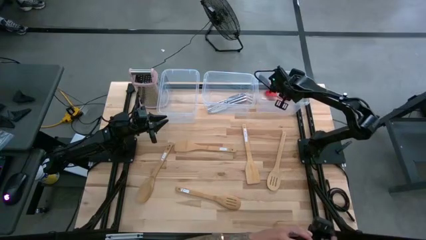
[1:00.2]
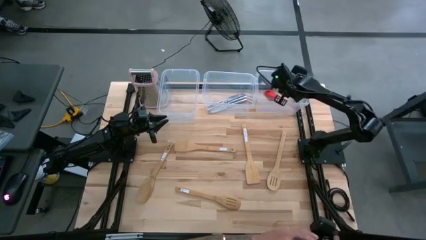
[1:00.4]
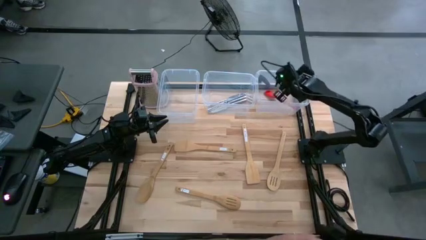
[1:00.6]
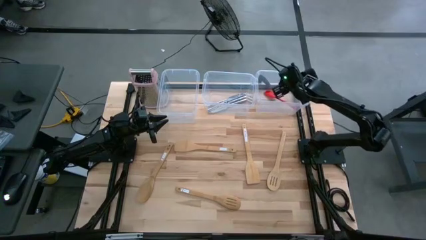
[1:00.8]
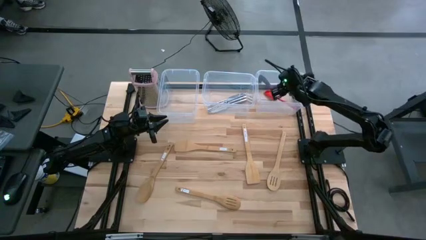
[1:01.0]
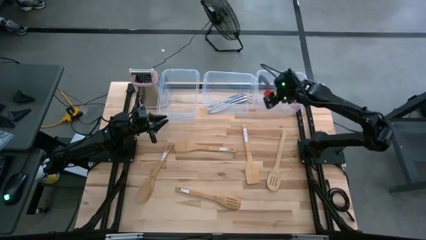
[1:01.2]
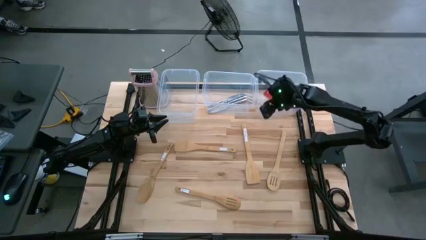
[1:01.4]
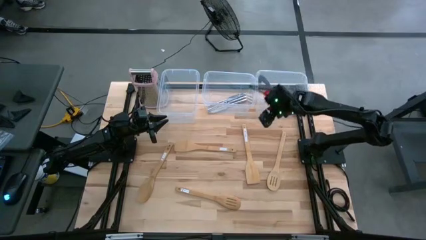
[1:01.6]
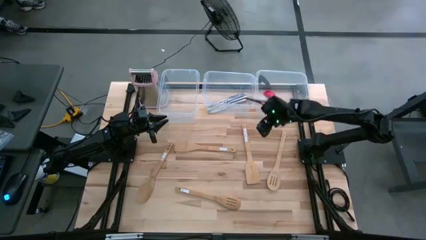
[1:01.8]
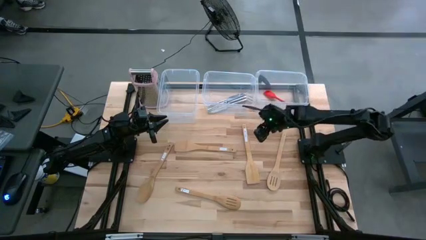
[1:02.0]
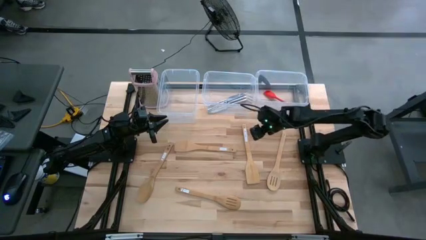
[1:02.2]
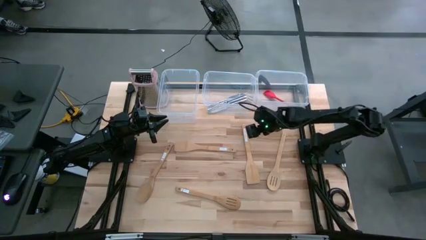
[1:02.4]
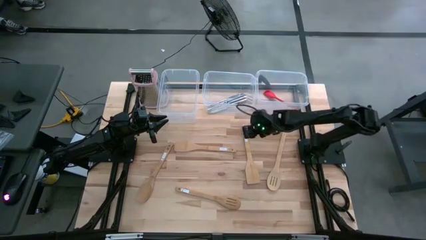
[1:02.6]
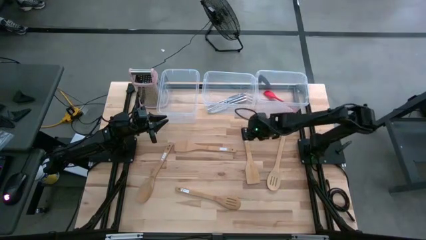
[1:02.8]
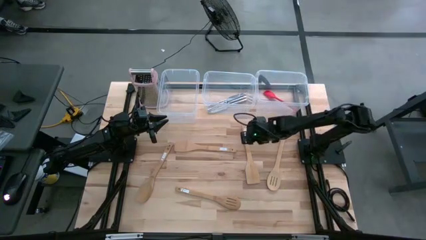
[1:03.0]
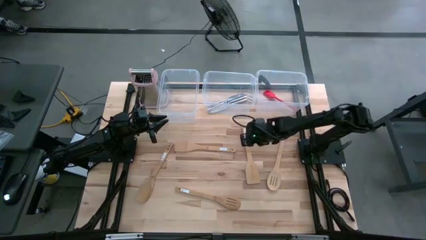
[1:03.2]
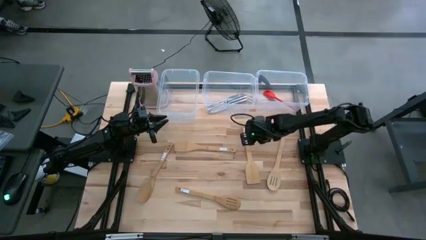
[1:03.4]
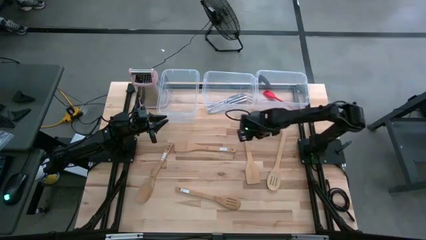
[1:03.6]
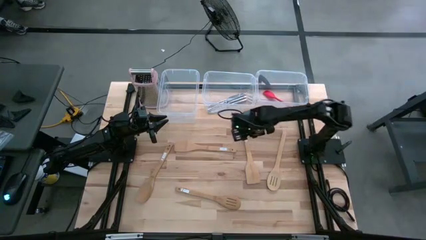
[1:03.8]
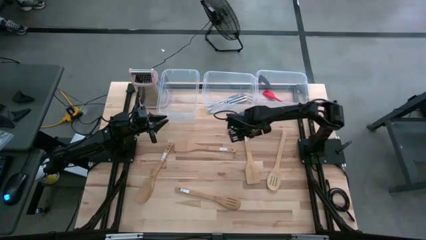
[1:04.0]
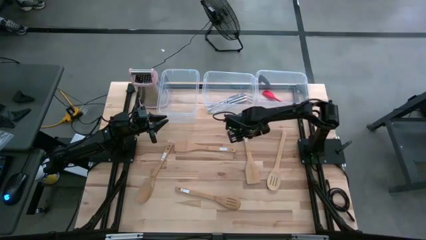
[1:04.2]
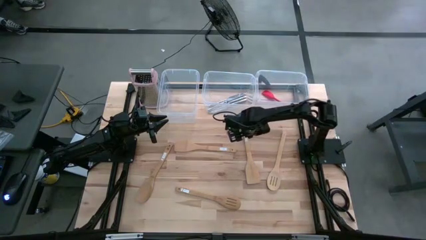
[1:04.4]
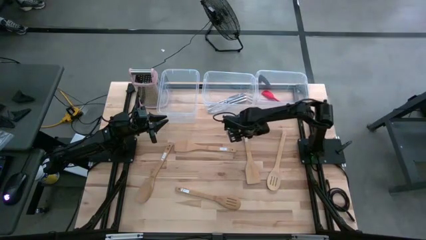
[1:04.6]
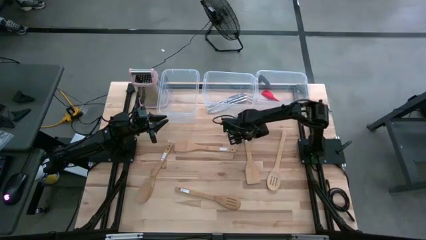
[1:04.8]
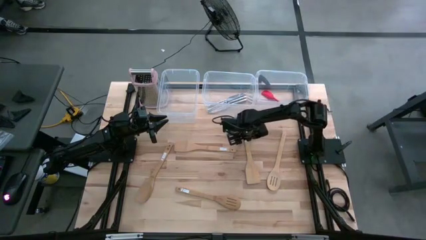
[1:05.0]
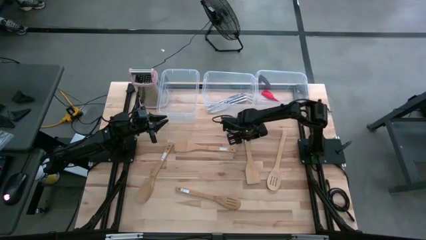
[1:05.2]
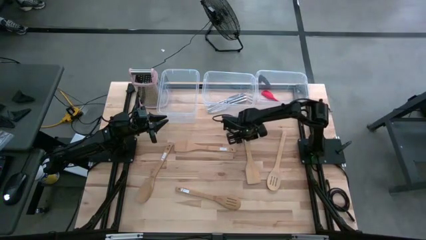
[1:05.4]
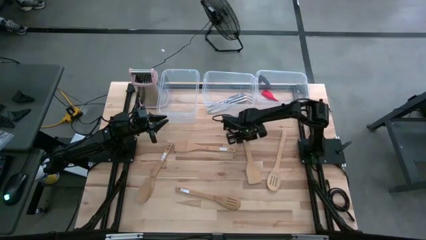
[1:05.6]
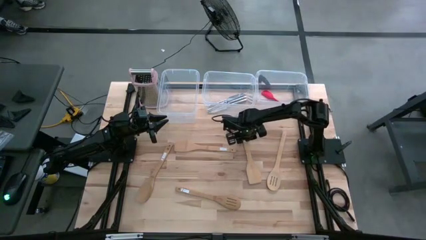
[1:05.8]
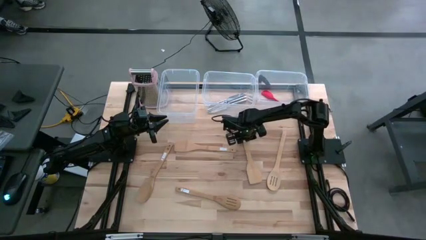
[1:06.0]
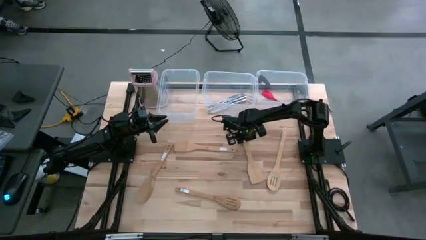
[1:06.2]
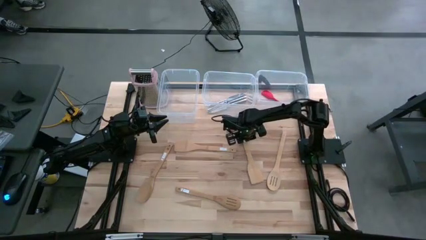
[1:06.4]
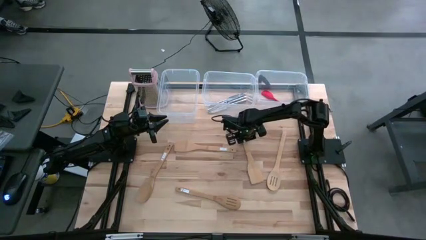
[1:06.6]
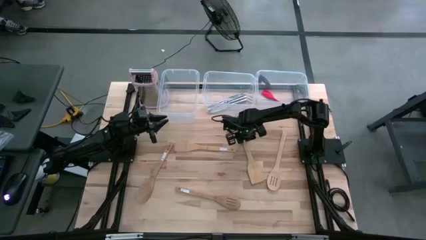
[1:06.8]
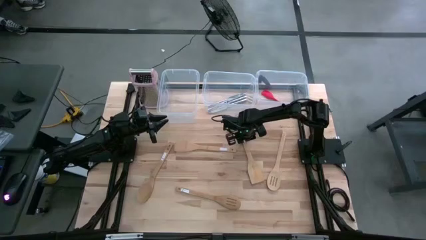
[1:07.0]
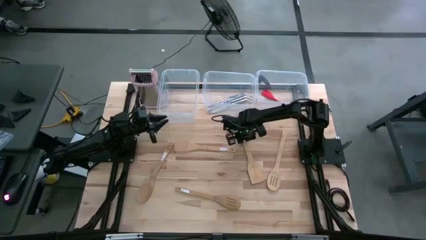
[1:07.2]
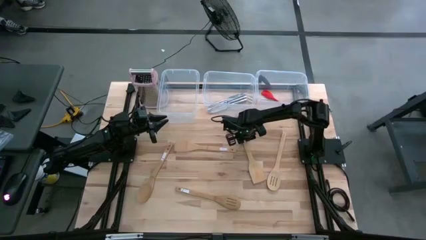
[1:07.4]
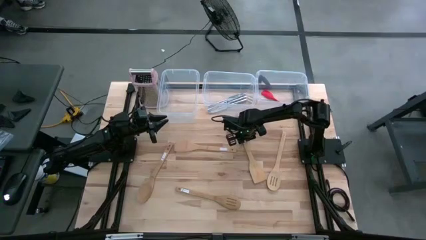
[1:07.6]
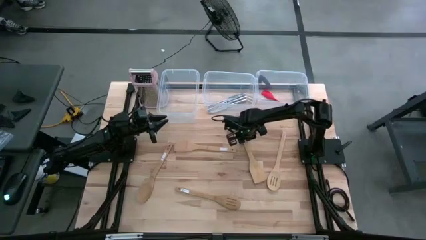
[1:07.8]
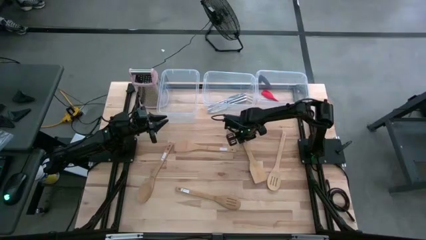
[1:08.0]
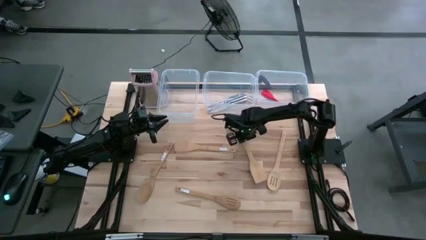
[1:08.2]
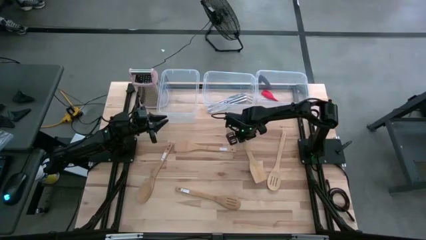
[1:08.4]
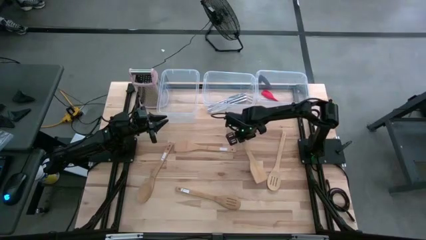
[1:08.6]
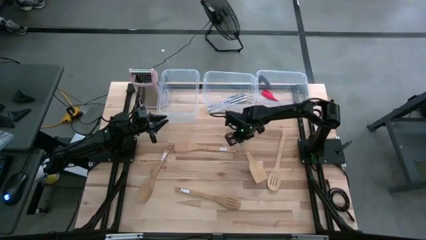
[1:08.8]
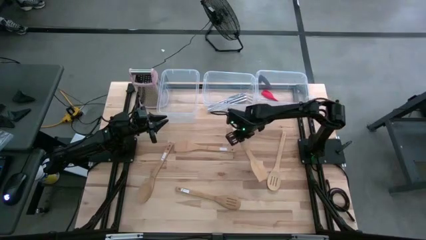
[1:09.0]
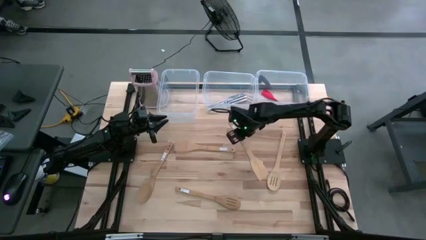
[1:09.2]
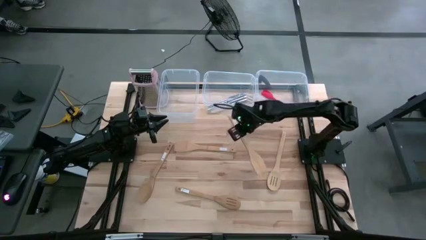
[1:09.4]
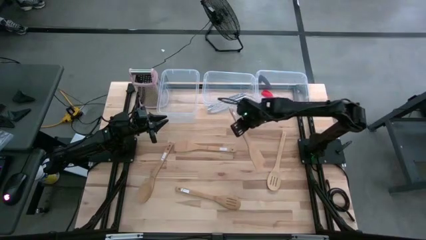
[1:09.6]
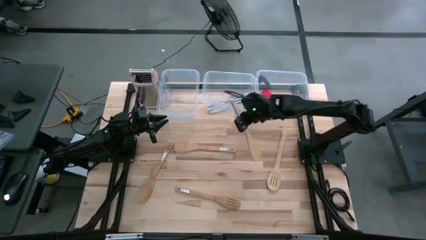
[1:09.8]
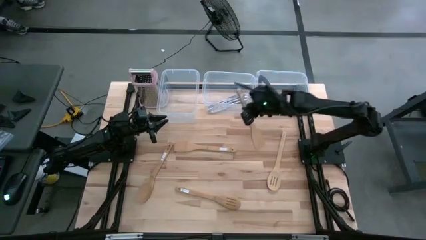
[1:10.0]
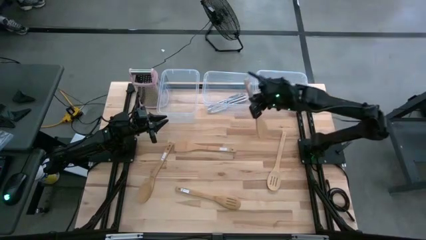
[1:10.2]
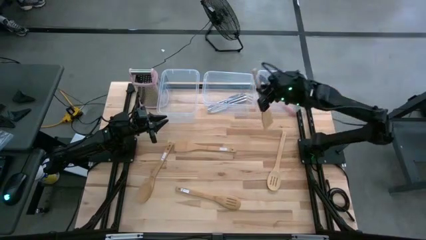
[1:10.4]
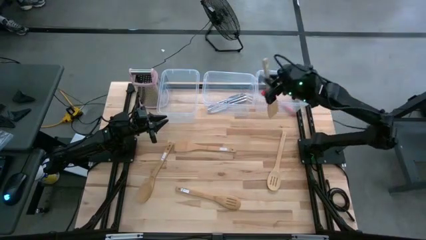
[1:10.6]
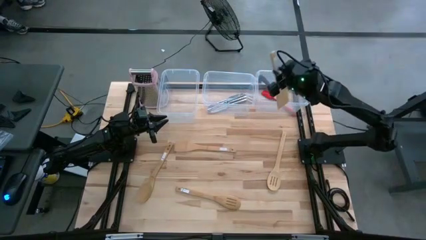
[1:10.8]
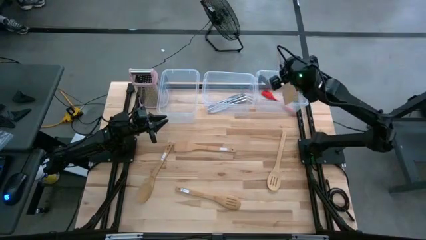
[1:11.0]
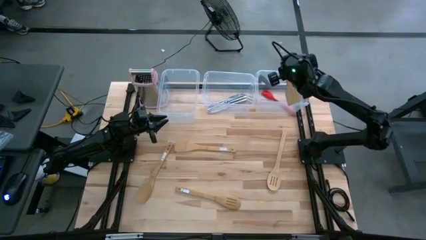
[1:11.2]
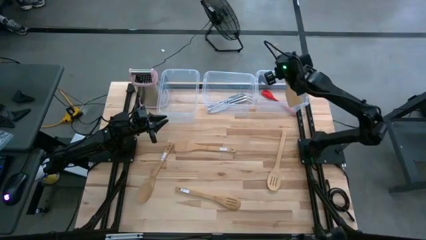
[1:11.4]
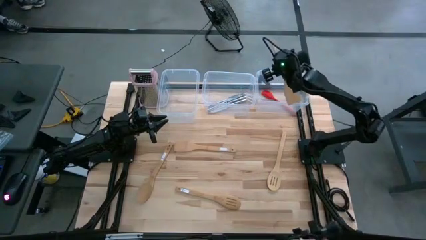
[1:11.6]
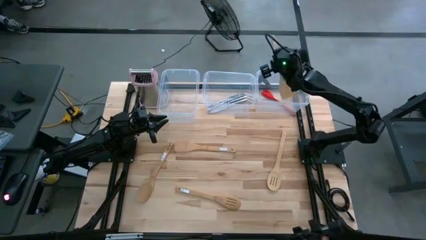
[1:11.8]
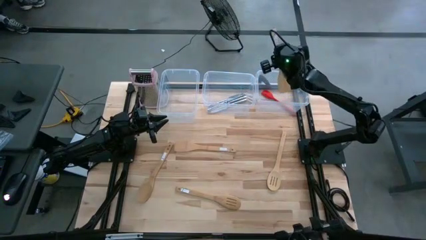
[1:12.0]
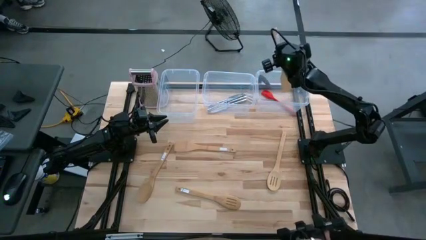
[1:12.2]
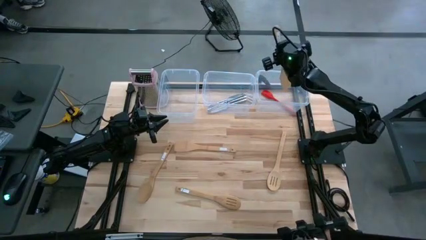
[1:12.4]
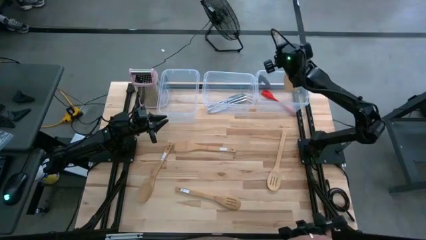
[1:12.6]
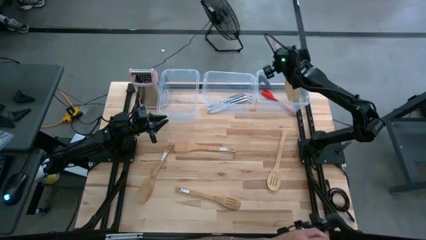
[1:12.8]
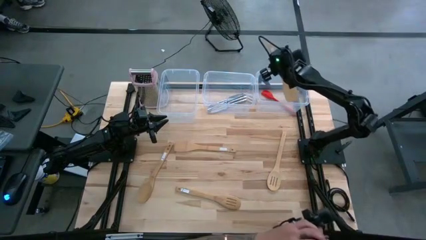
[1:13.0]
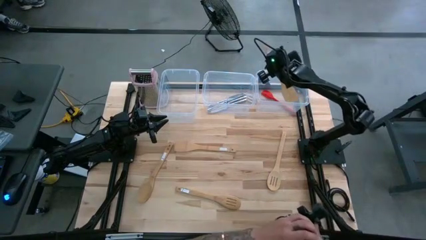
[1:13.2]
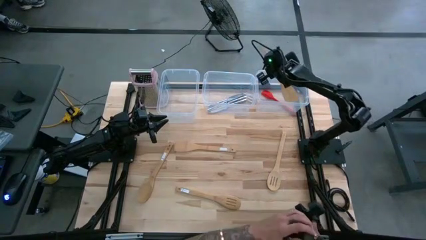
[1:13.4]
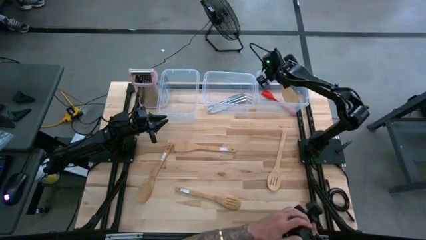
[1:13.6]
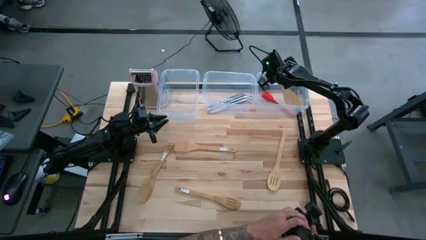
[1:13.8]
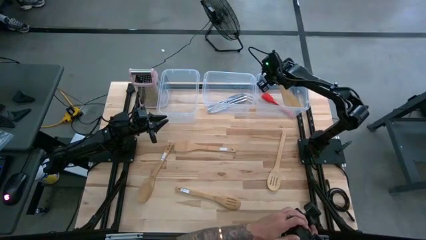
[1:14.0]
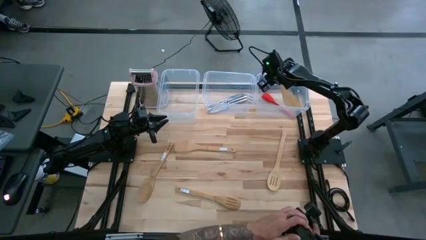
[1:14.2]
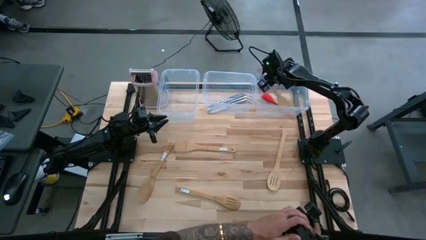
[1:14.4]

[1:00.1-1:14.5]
Task: Pick & Place Kitchen Items
Put the brown spatula into the right transparent container
